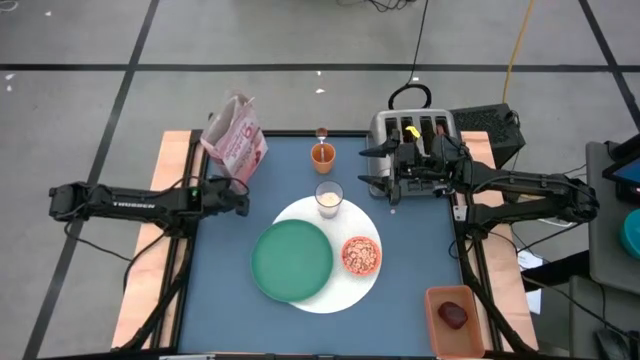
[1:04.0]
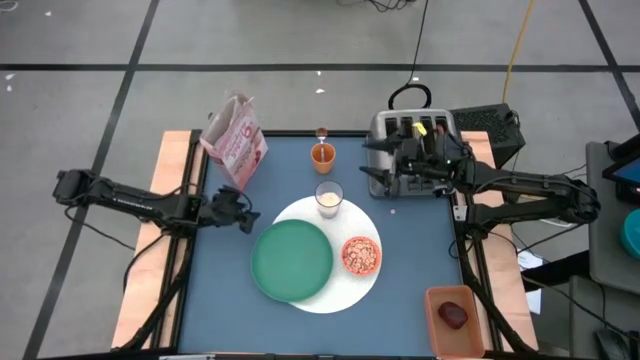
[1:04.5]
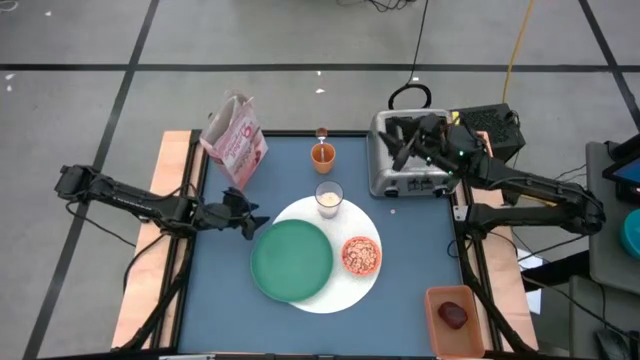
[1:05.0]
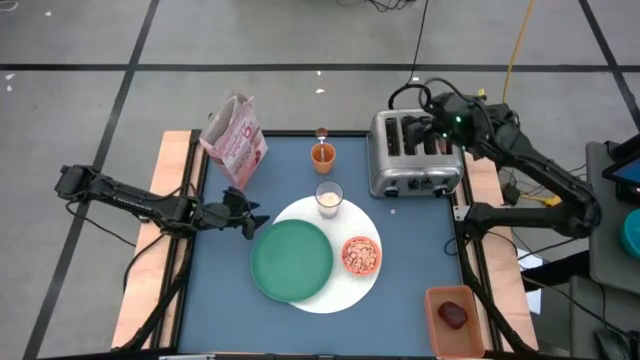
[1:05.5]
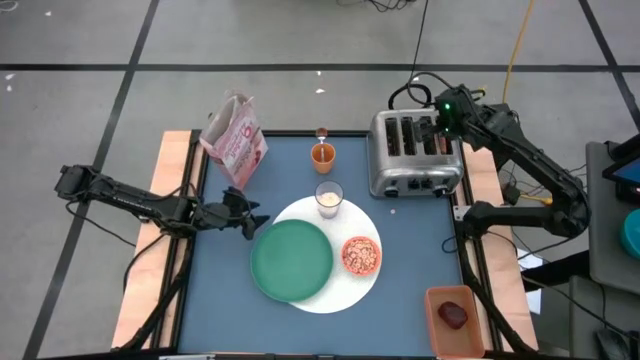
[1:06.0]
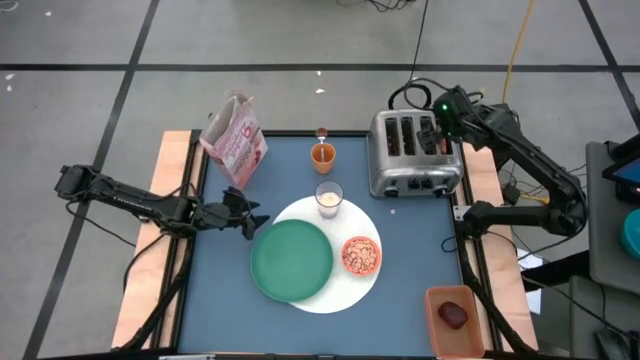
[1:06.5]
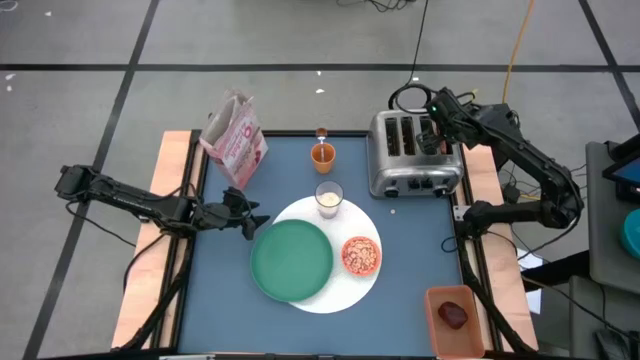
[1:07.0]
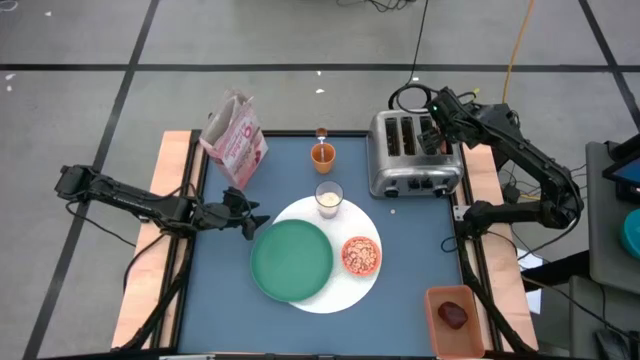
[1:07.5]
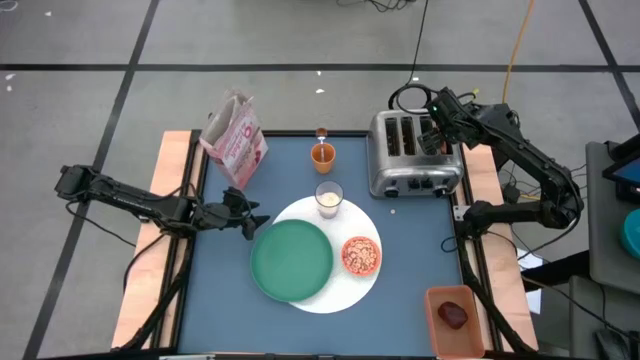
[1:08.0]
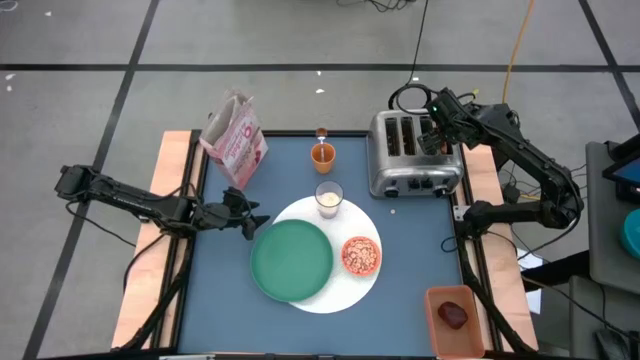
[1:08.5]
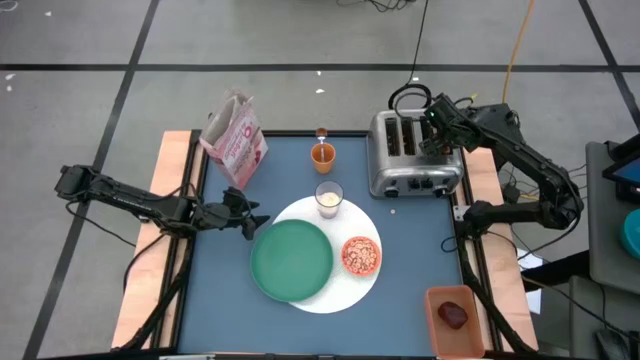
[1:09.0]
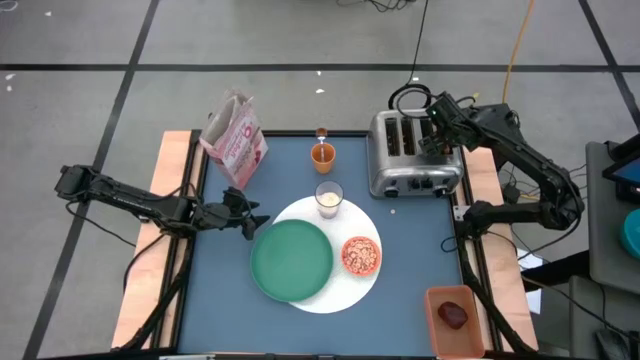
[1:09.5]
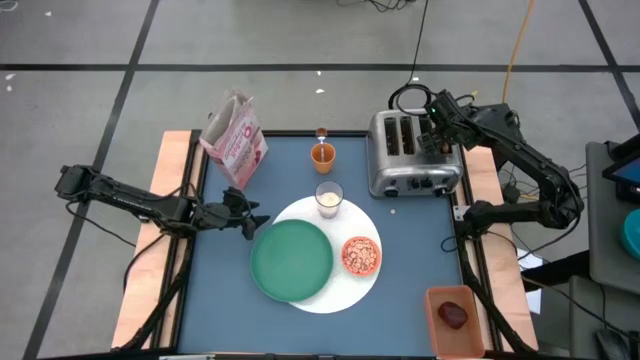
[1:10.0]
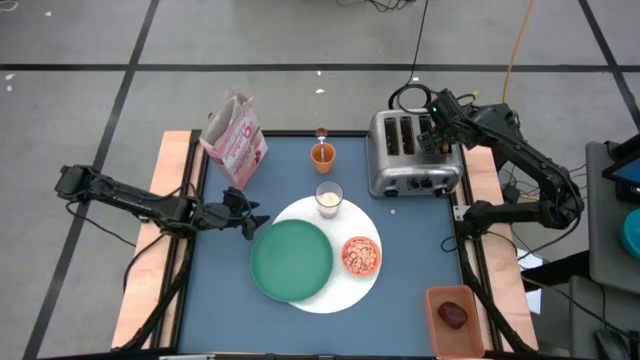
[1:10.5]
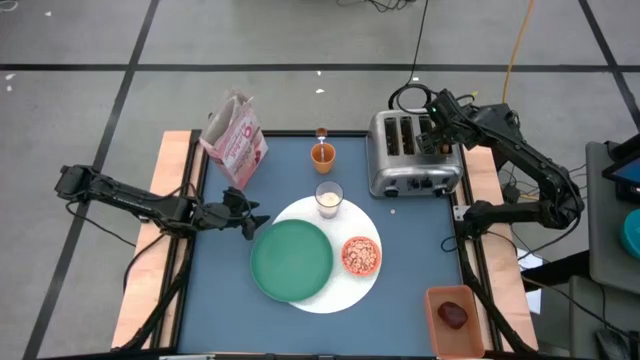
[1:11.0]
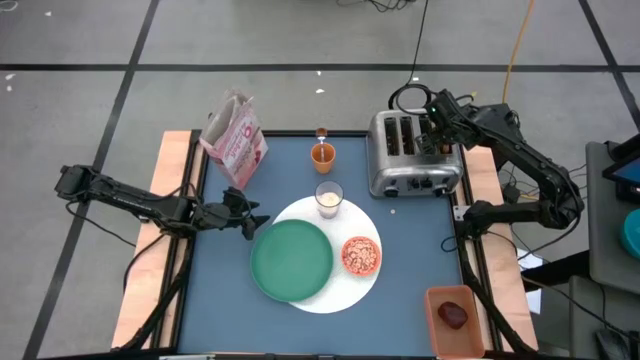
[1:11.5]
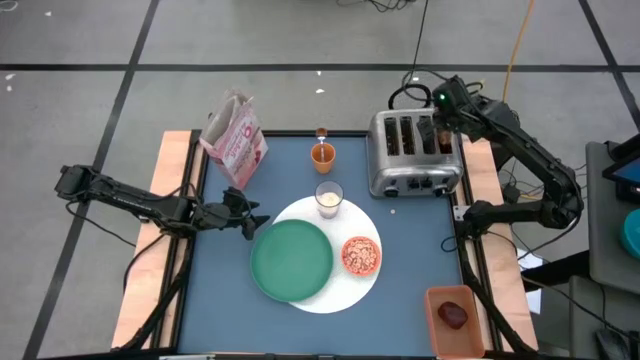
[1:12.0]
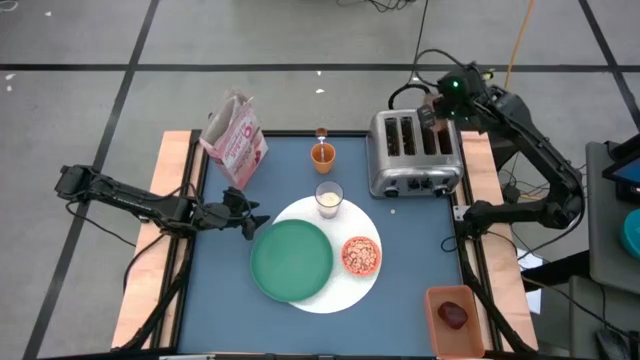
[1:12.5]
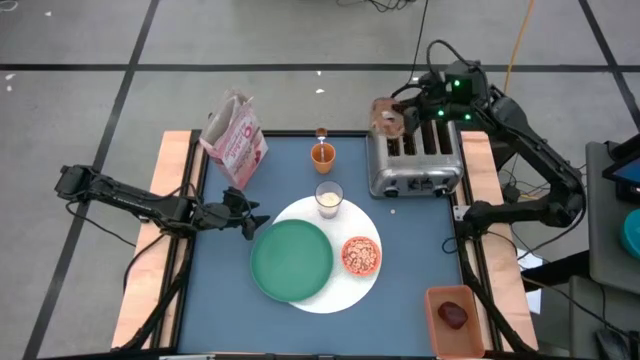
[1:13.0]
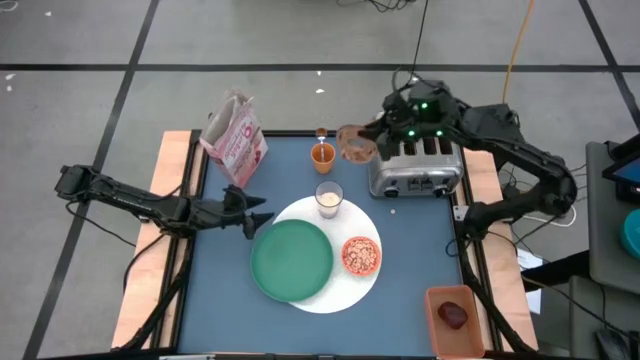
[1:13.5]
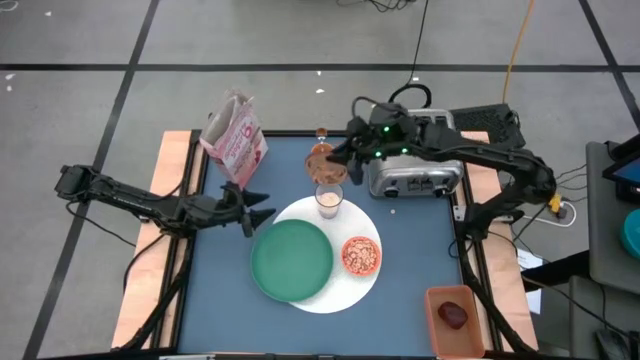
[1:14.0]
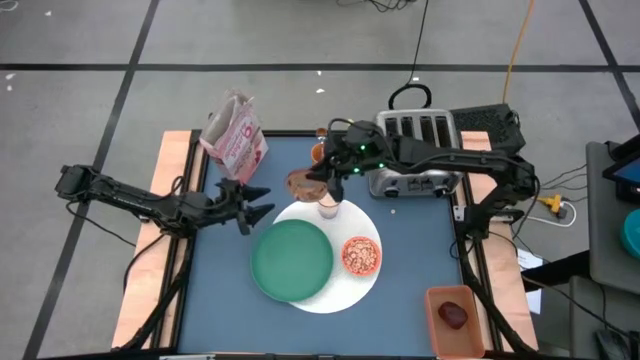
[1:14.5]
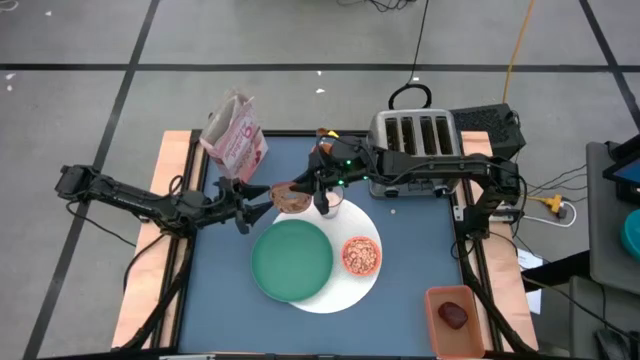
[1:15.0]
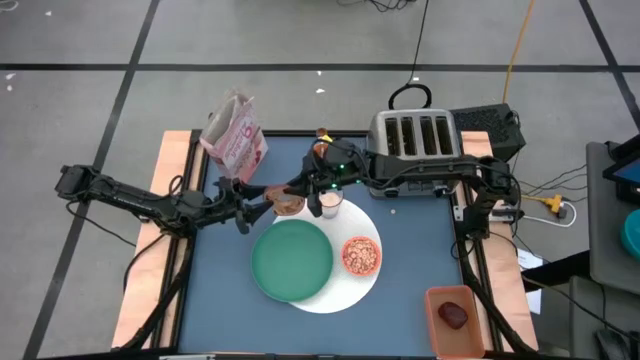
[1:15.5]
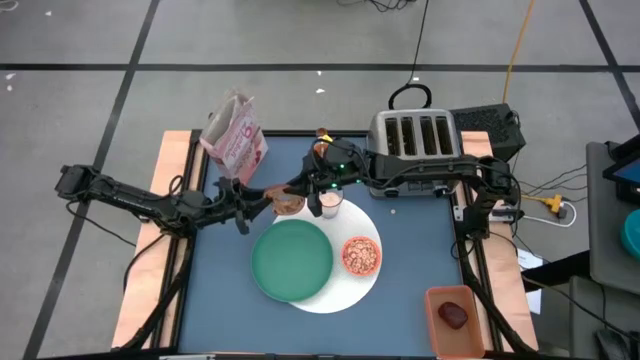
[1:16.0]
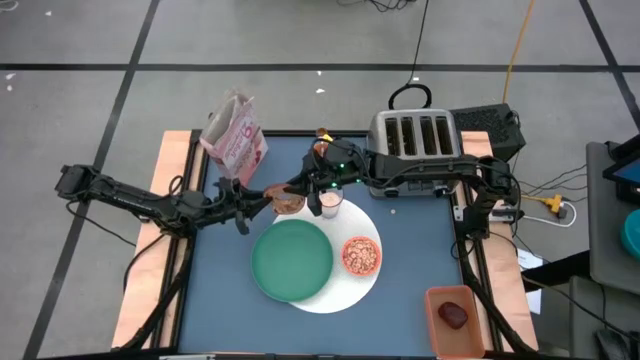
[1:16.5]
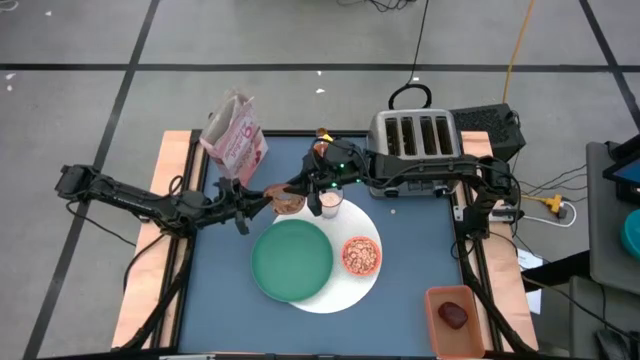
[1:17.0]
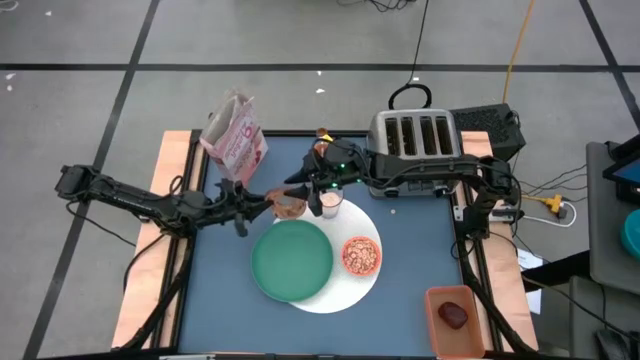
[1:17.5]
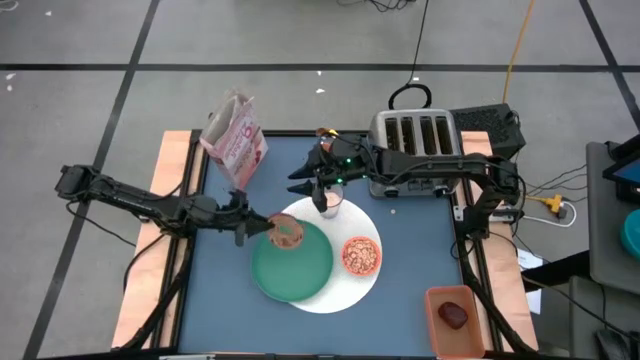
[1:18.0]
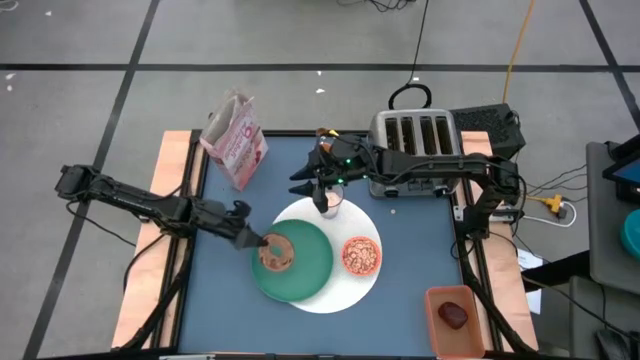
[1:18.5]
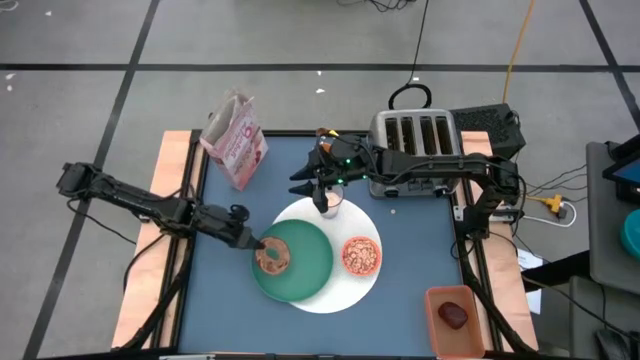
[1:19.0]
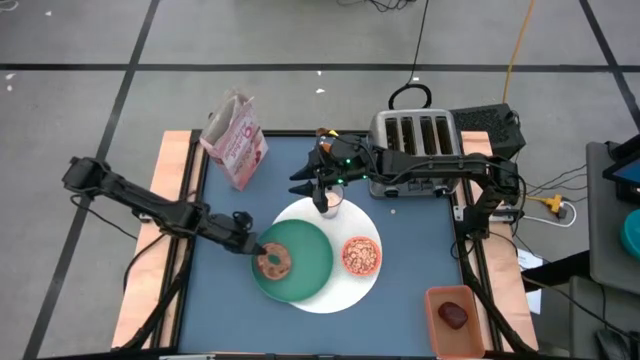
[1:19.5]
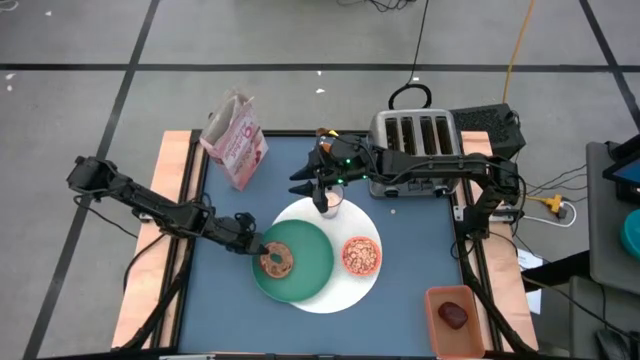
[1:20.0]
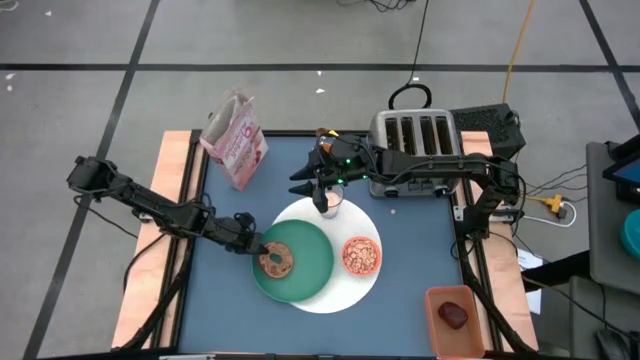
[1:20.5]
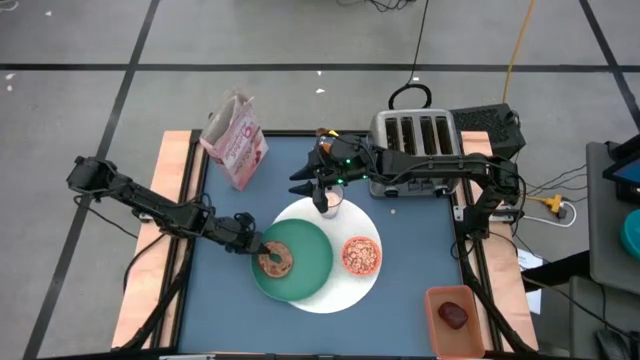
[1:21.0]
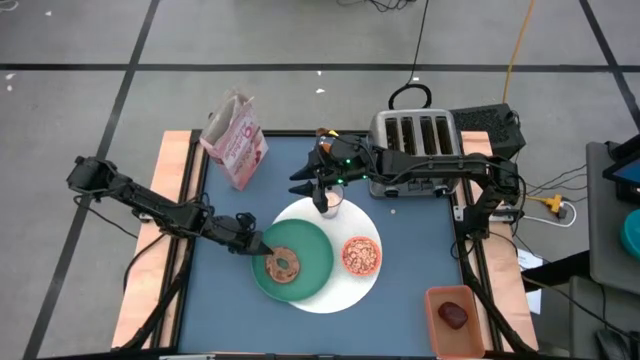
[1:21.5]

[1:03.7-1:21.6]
Task: Arrange a breakfast setting
Put the toasted bagel on the green plate

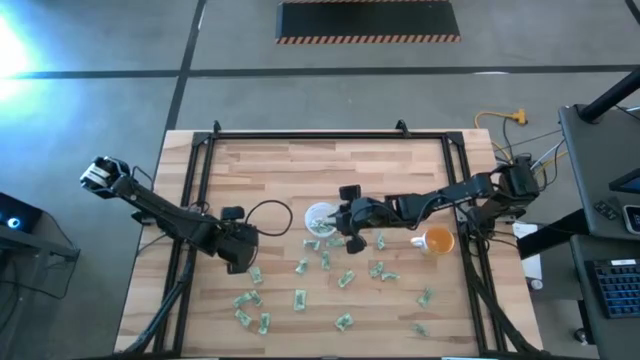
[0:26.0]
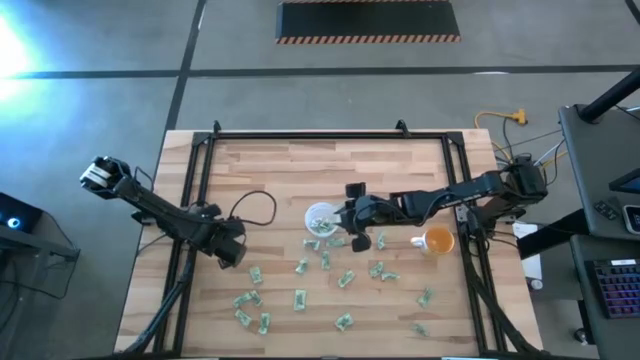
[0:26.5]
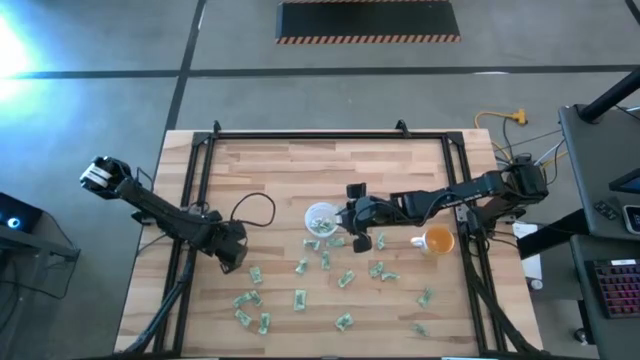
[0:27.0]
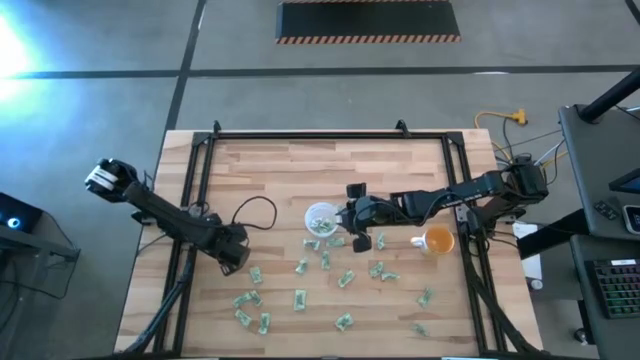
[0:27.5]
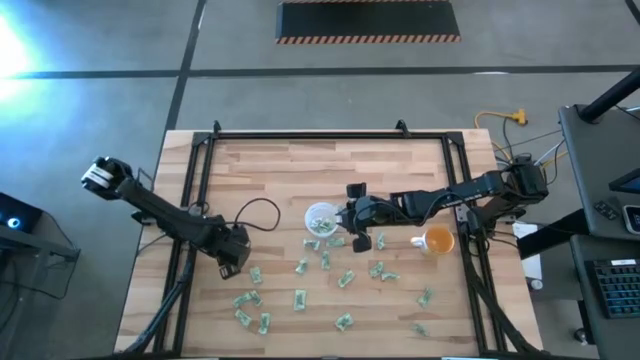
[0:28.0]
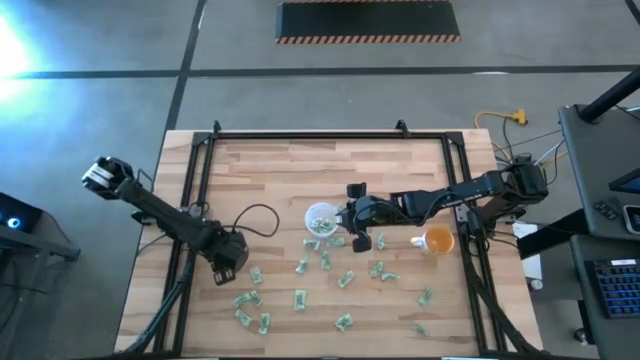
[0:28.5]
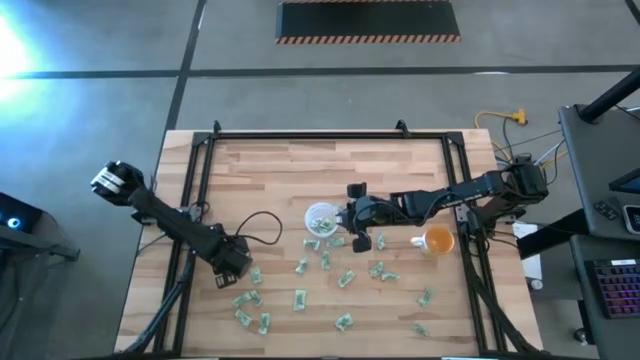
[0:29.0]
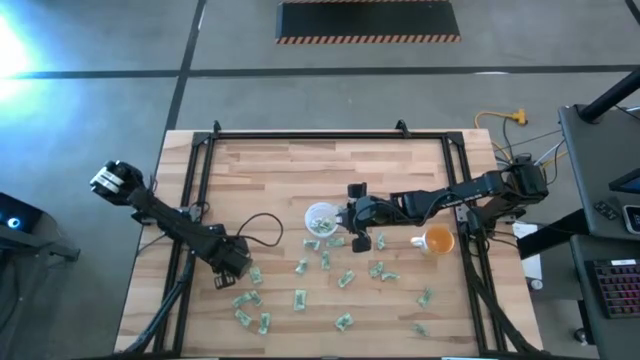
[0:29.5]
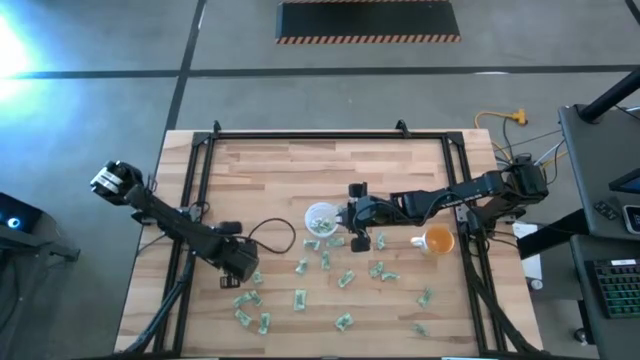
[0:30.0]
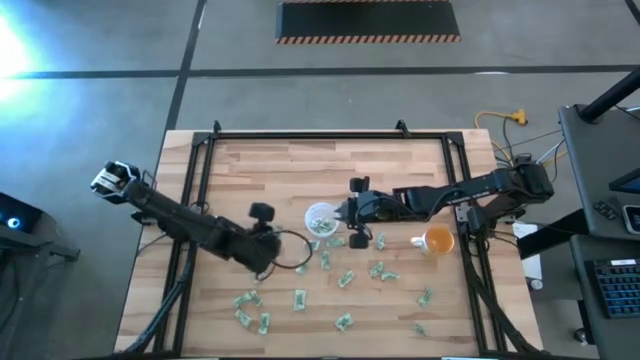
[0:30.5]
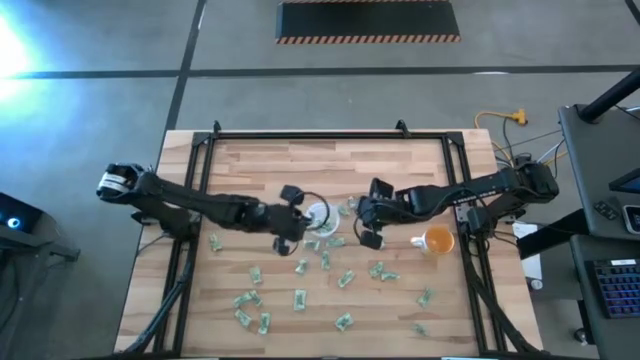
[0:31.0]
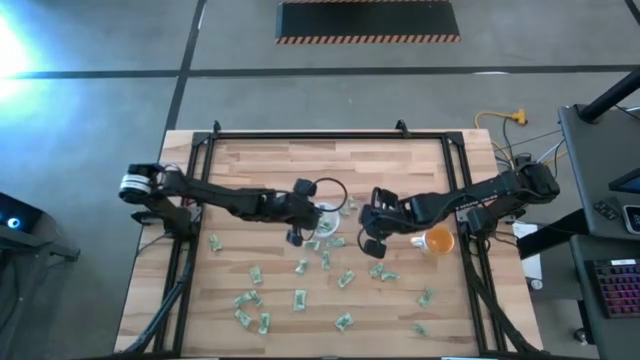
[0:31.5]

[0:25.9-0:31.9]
Task: Pick and place Stevia / Truvia into bins
Put the light green stevia packet into the transparent container
